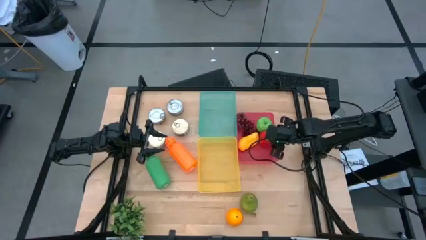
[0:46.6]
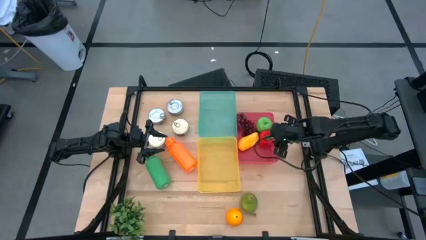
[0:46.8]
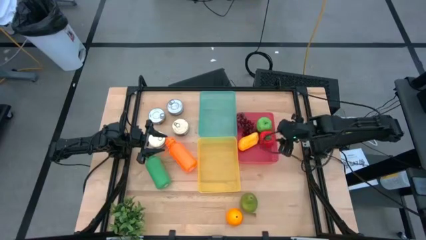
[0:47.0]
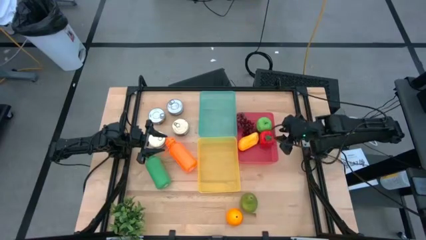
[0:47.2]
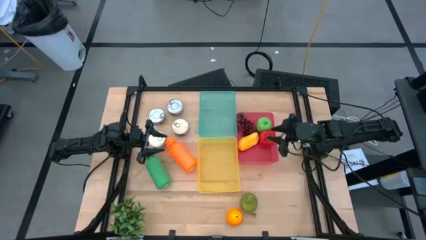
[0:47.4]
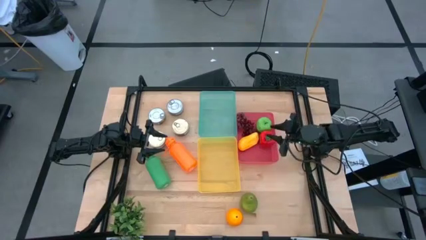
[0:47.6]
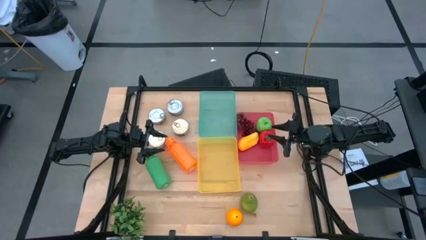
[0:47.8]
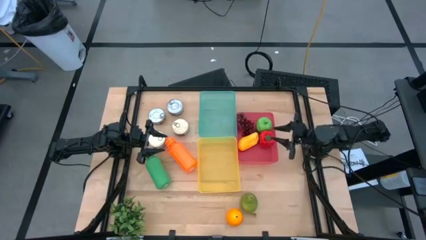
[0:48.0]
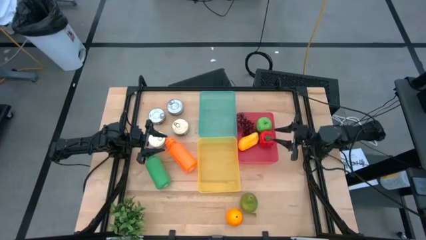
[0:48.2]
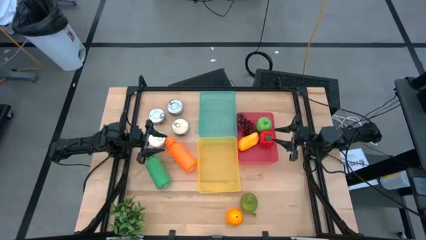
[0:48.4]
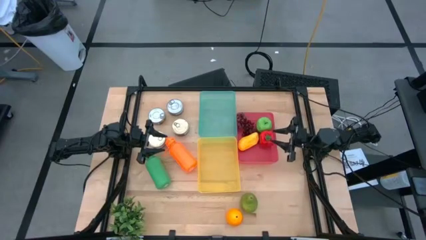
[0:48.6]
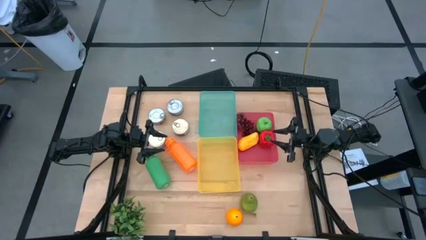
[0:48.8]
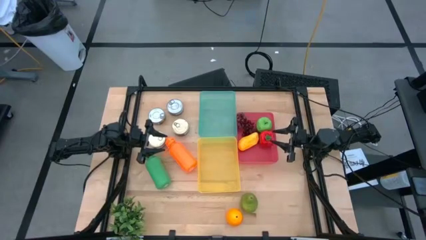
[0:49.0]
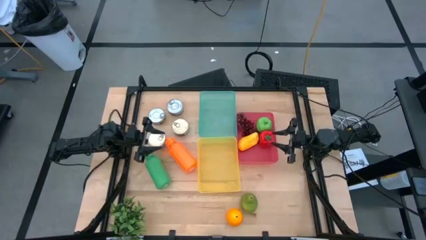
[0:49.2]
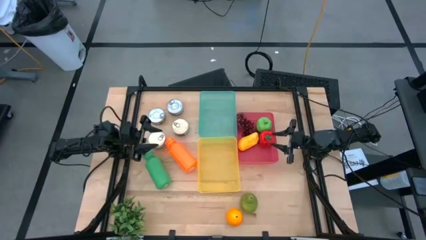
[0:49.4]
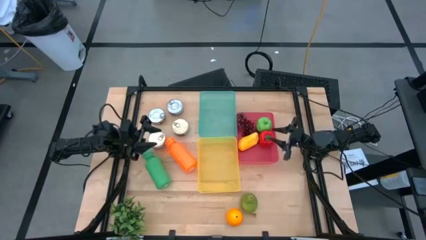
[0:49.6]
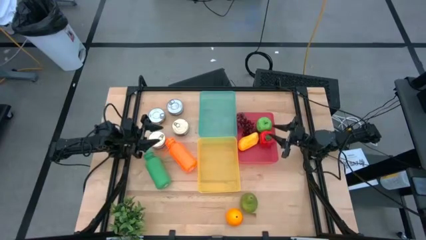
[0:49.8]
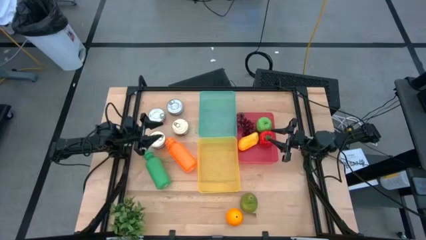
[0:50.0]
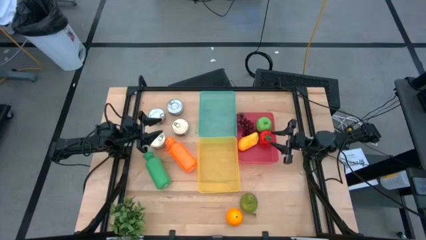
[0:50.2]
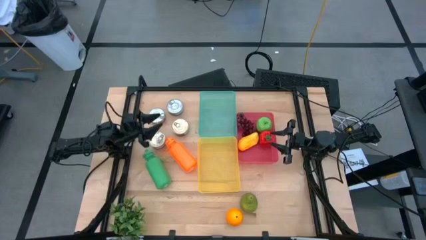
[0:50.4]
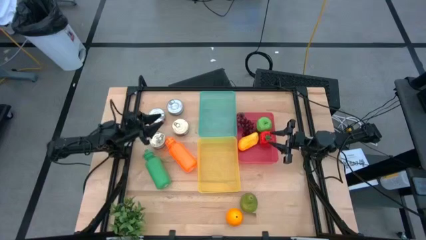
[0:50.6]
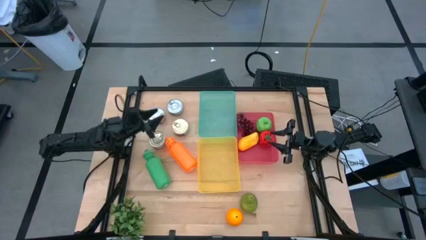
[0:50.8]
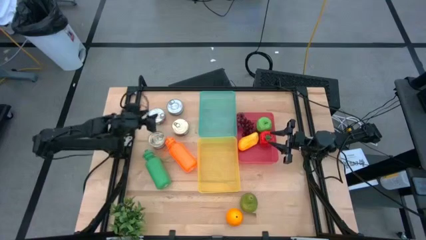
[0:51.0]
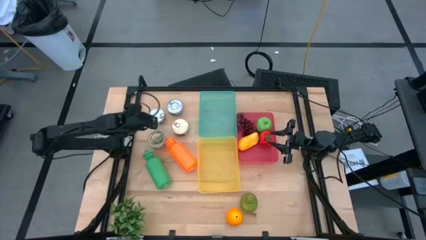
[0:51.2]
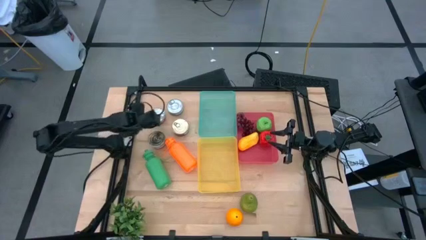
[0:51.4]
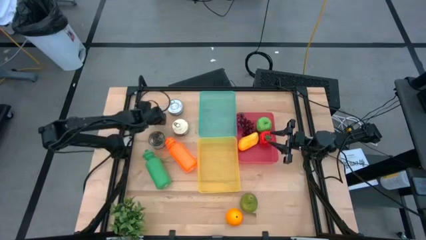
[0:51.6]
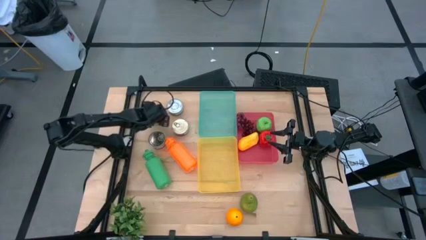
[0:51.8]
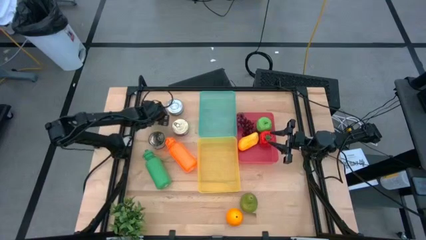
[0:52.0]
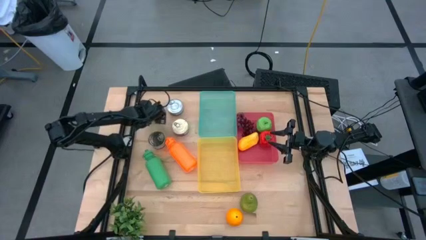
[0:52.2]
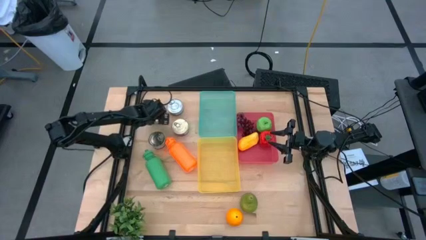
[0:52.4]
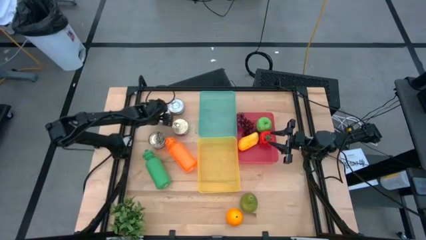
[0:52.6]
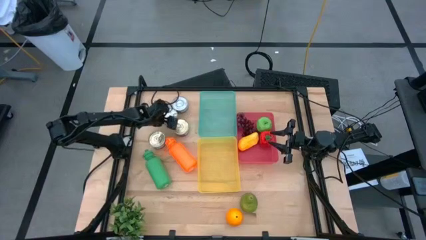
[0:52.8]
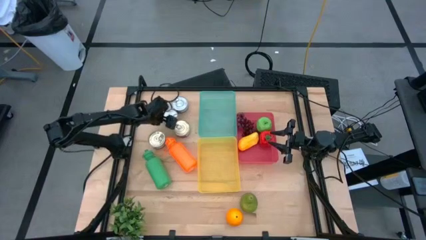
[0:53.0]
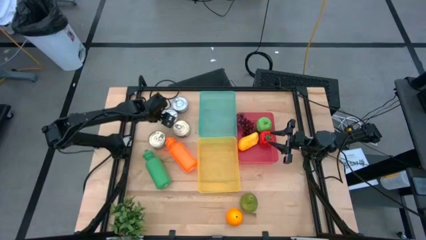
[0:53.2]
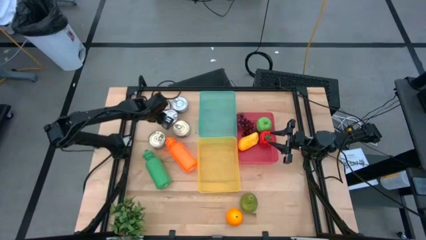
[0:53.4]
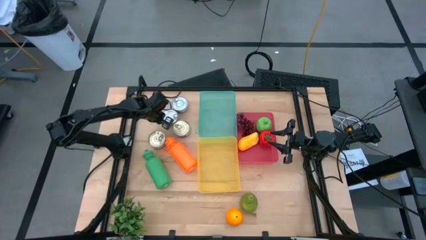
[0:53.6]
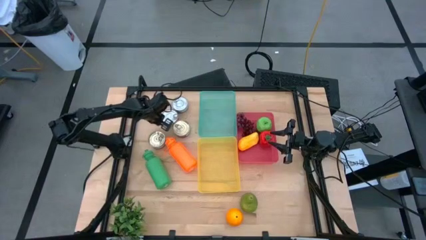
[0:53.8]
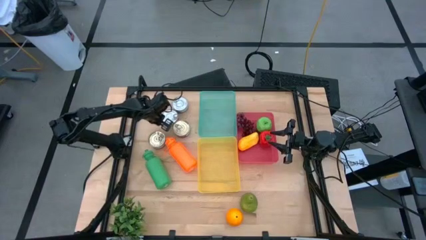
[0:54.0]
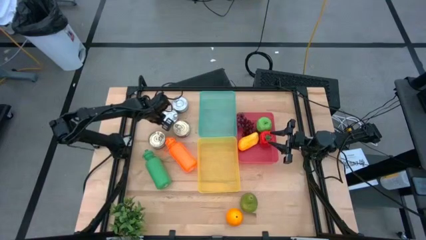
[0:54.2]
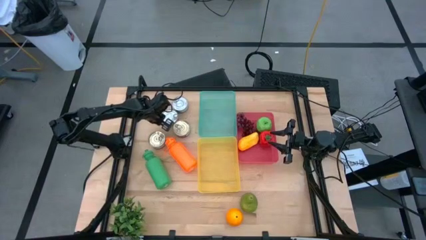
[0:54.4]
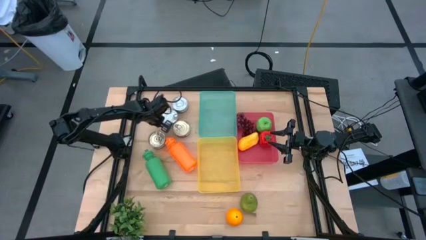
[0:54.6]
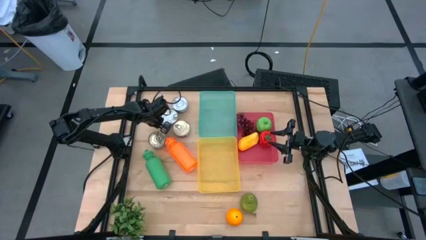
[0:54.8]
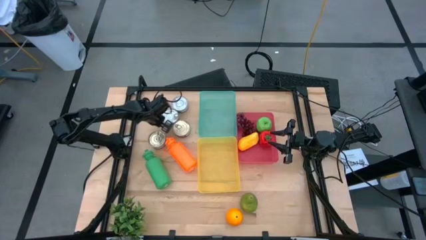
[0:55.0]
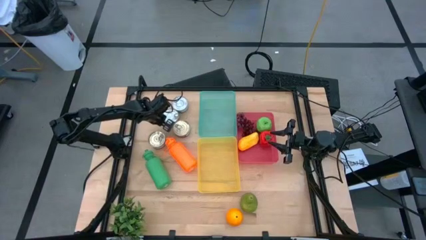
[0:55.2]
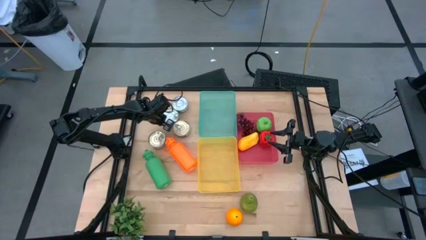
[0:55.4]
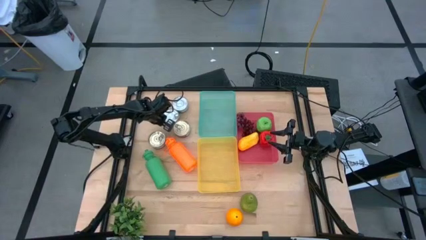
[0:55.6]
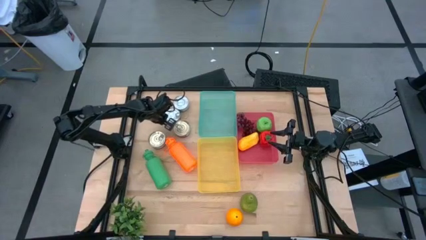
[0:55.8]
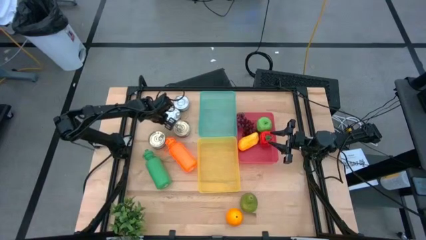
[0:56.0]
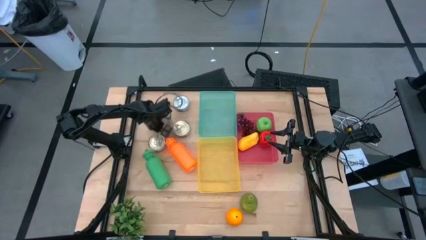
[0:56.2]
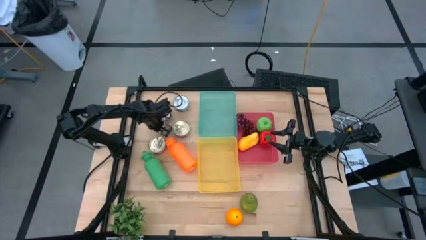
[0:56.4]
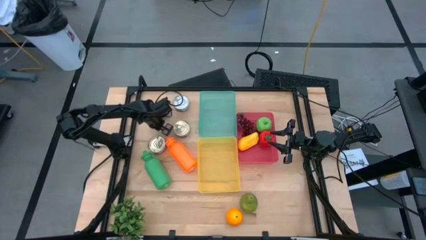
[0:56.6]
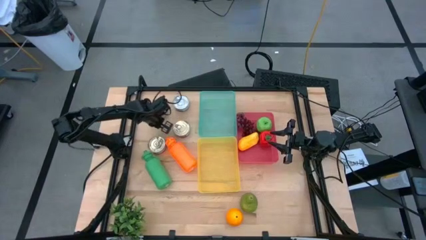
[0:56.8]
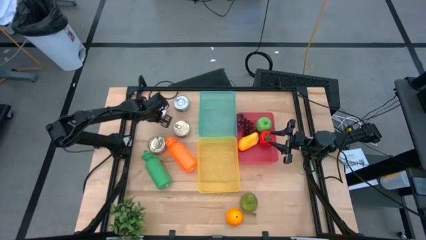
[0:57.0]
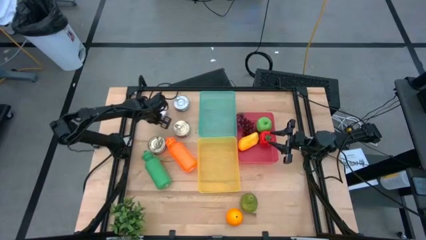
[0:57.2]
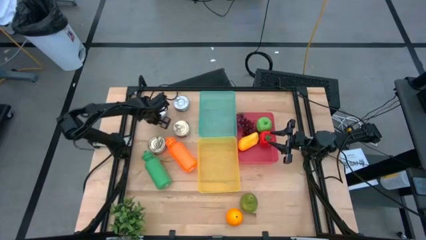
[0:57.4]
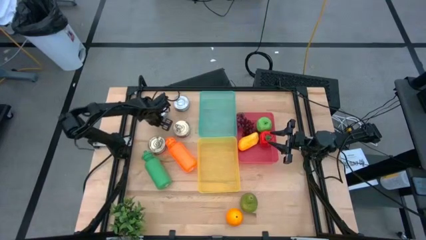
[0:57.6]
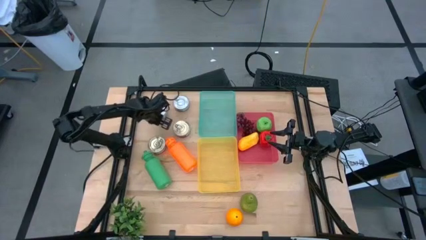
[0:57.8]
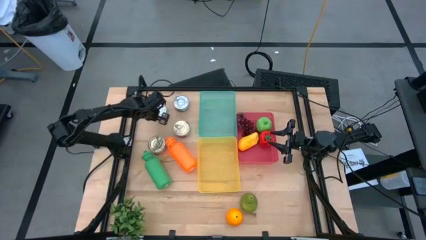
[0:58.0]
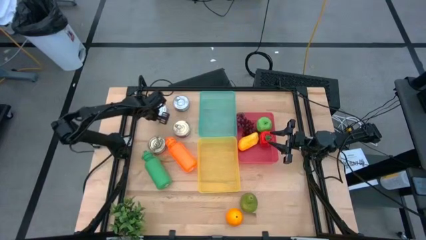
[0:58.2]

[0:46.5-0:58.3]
Task: Pick & Place Food Item
Put the left green tuna can into the light blue bin

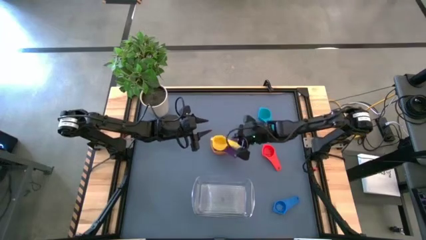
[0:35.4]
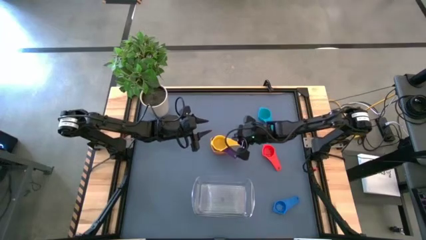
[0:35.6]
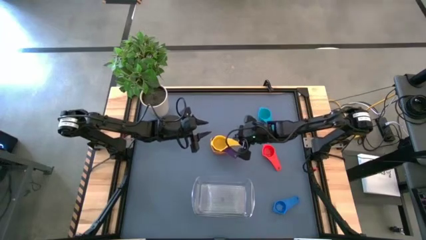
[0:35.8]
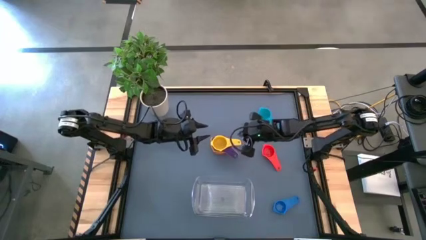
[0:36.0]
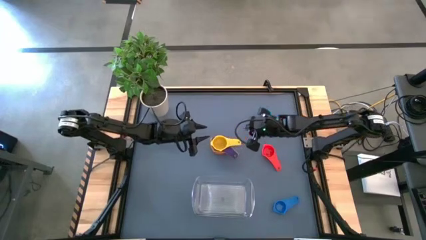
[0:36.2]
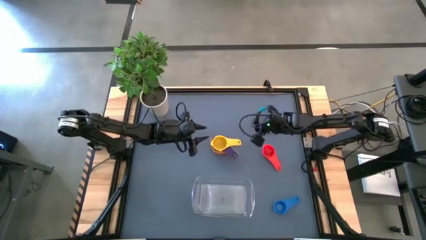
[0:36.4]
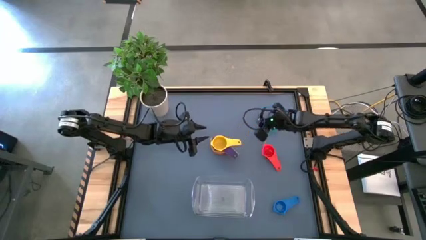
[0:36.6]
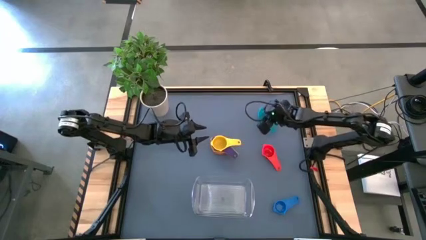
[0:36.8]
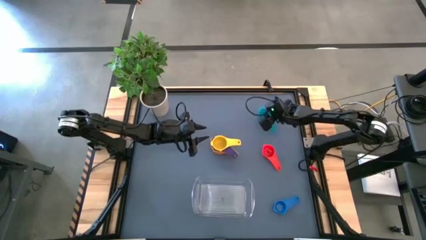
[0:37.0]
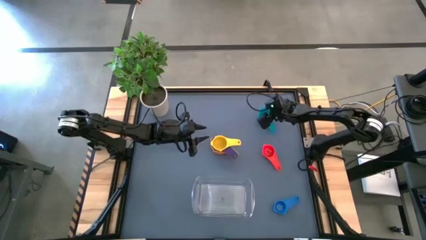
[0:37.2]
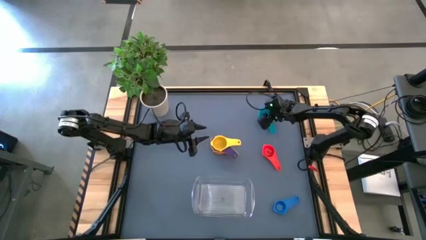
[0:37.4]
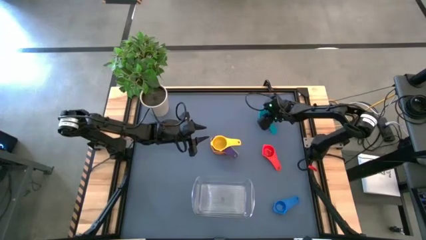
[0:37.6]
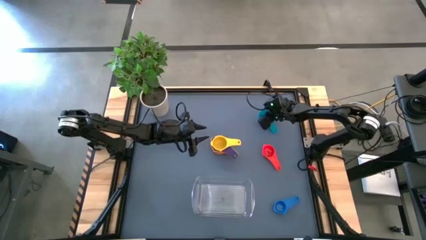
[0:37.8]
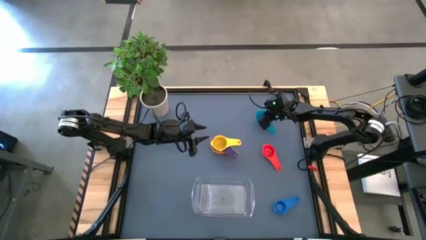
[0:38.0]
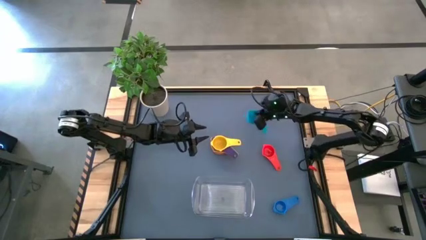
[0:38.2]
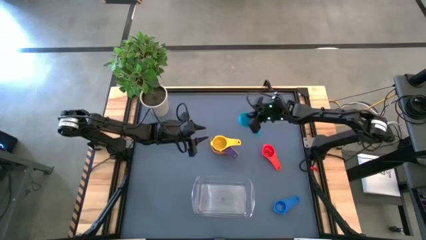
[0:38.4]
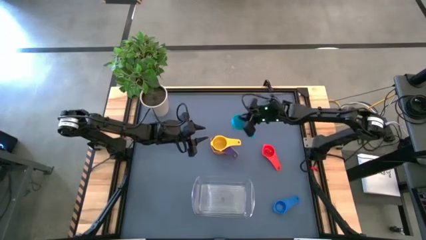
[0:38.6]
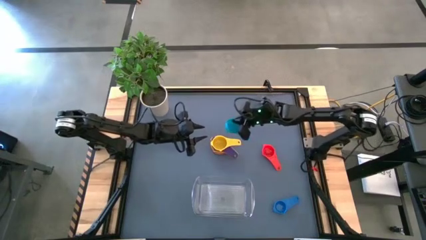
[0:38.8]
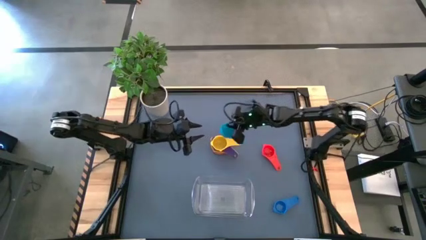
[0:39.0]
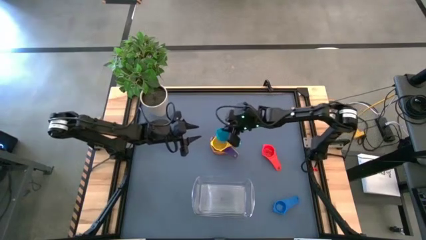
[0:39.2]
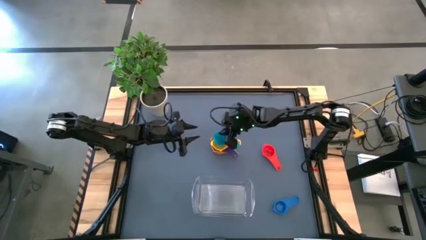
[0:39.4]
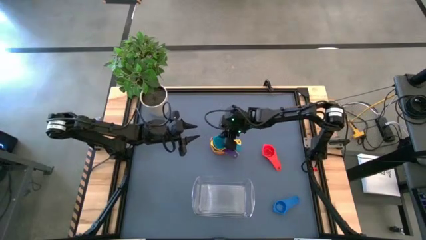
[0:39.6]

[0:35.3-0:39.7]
Task: Nest measuring cups in basket
Stack the light blue measuring cup on top of the yellow measuring cup
